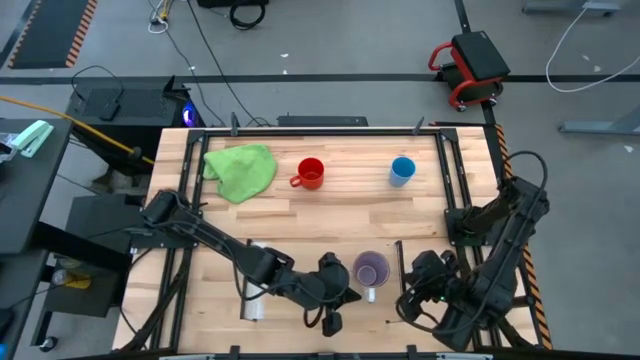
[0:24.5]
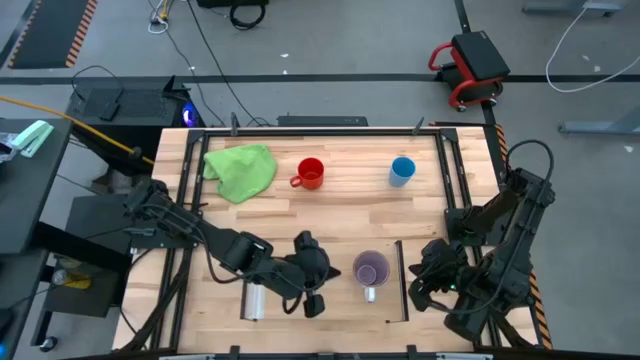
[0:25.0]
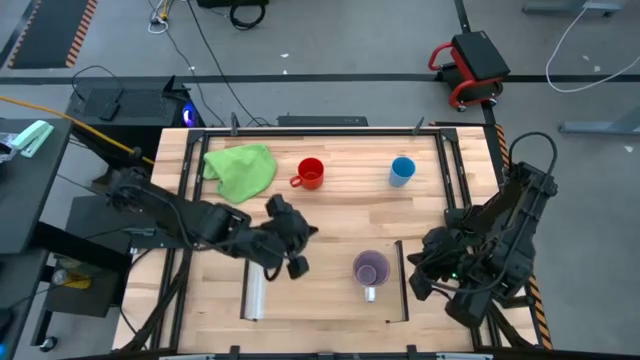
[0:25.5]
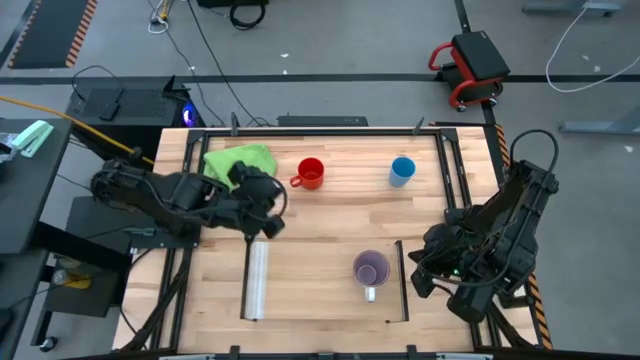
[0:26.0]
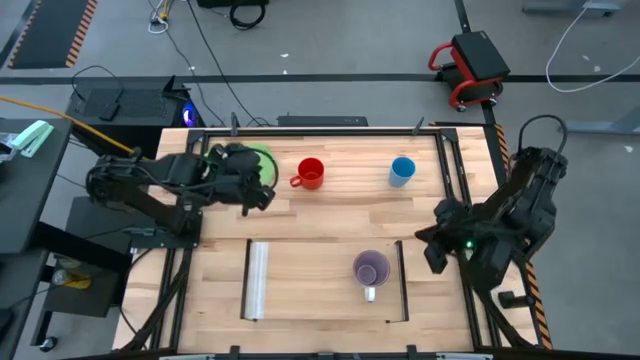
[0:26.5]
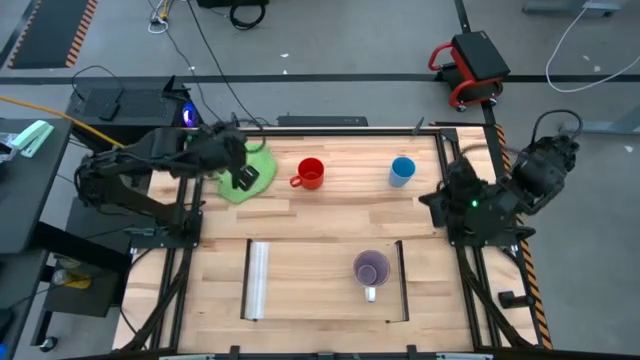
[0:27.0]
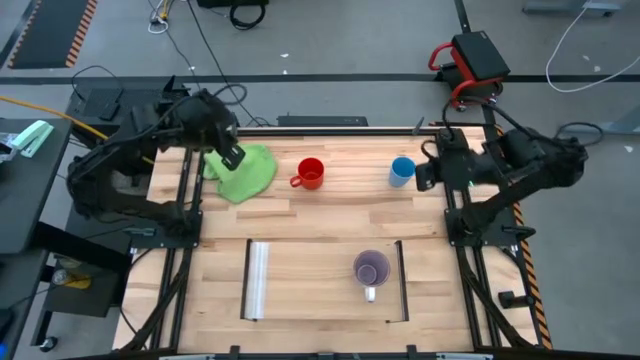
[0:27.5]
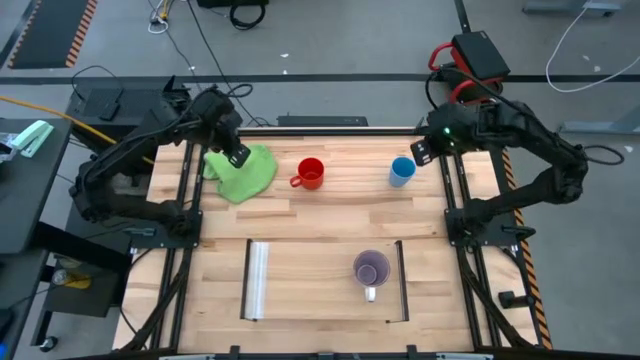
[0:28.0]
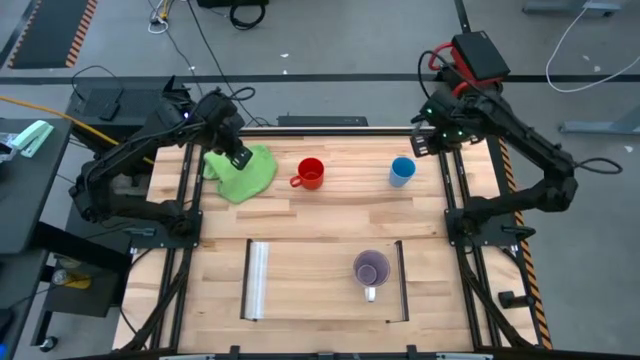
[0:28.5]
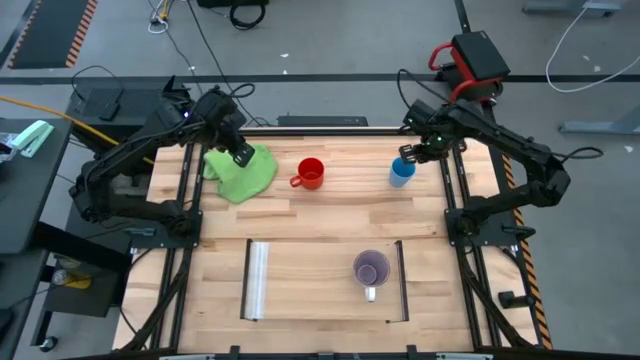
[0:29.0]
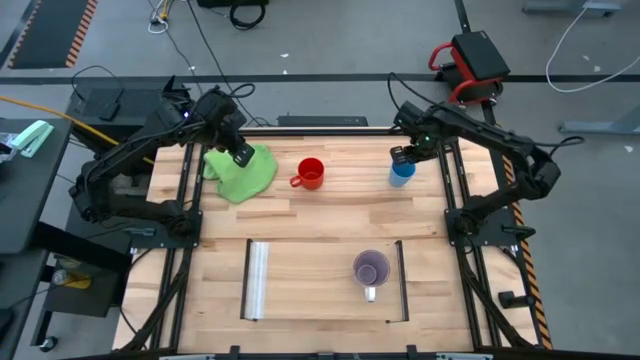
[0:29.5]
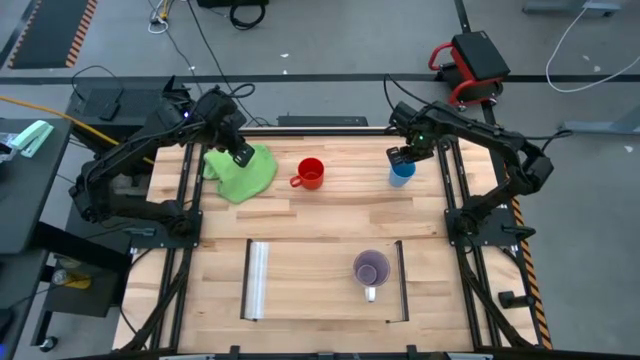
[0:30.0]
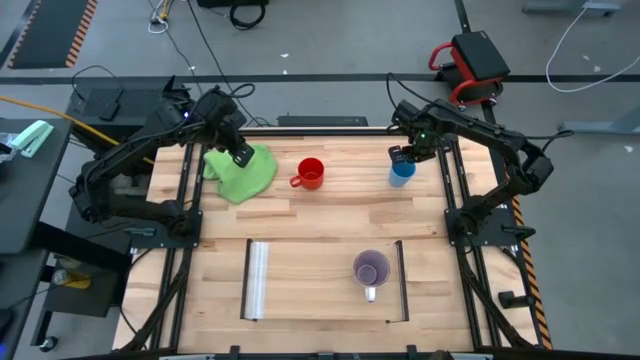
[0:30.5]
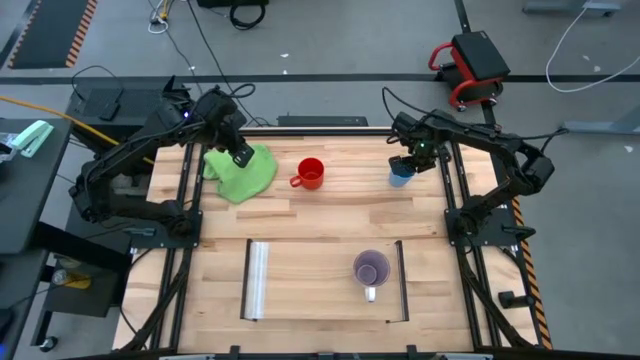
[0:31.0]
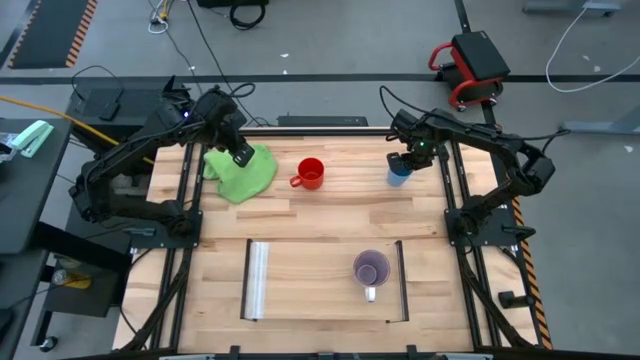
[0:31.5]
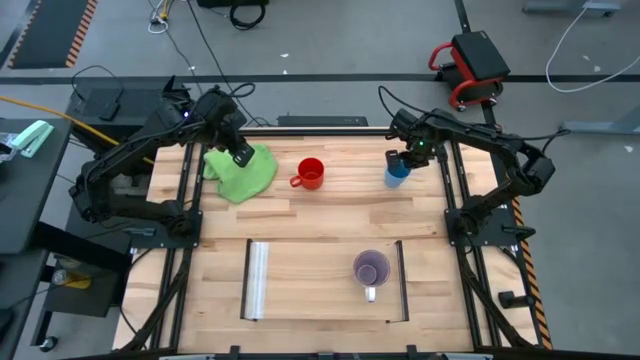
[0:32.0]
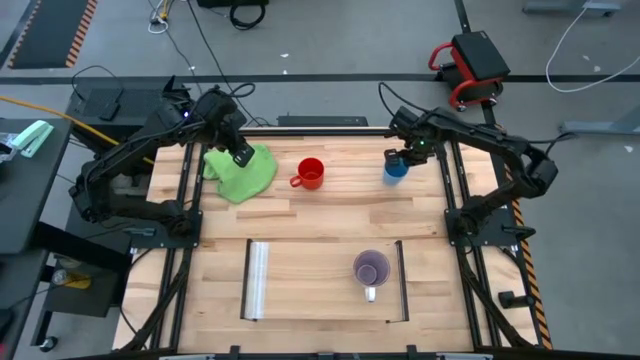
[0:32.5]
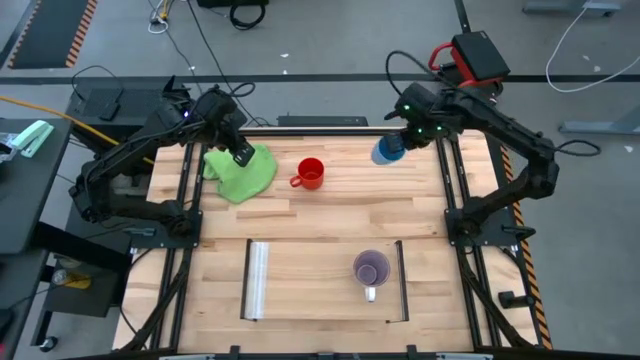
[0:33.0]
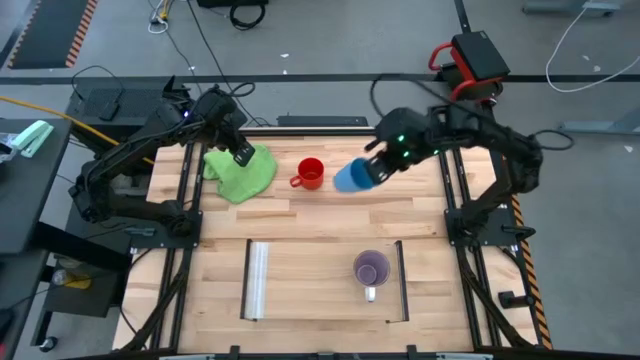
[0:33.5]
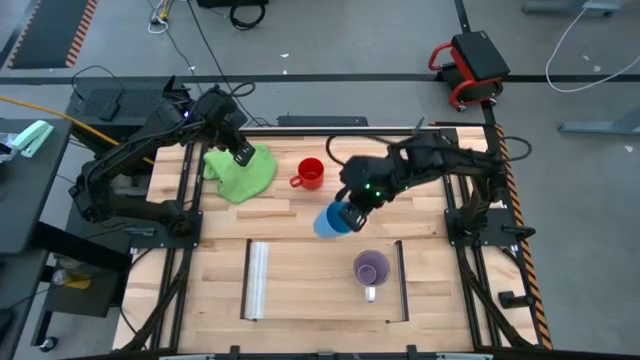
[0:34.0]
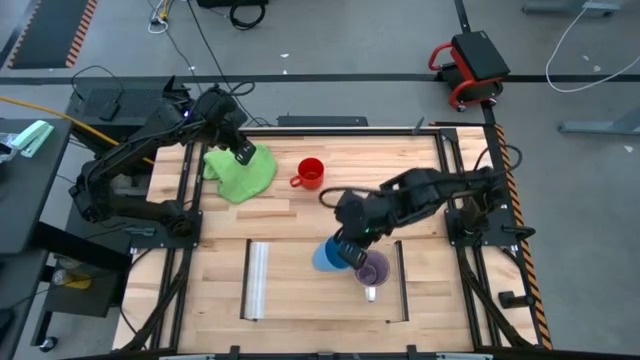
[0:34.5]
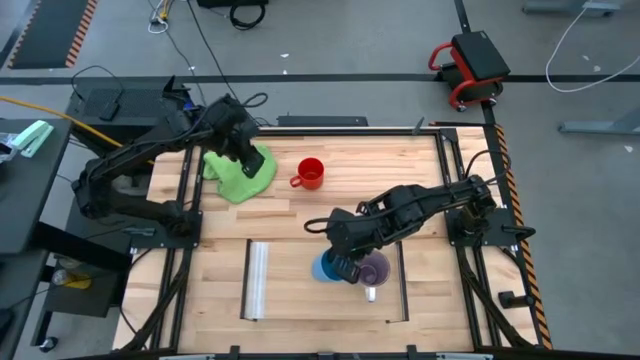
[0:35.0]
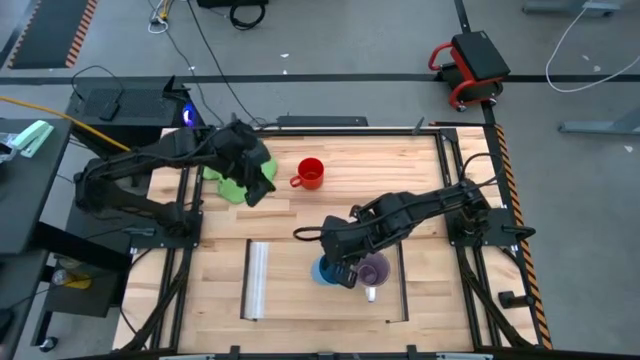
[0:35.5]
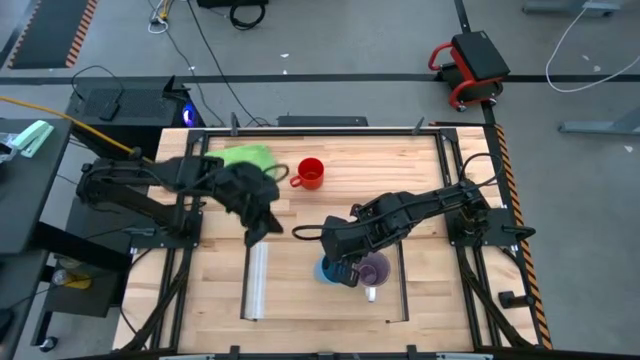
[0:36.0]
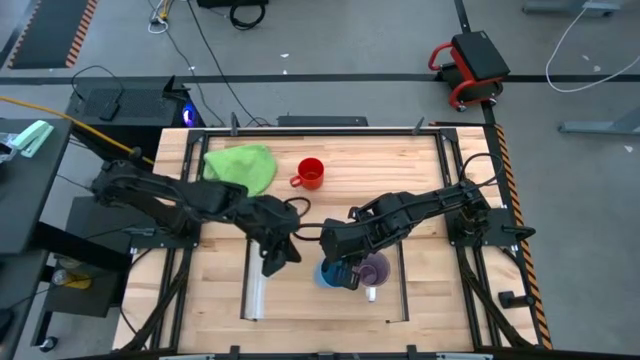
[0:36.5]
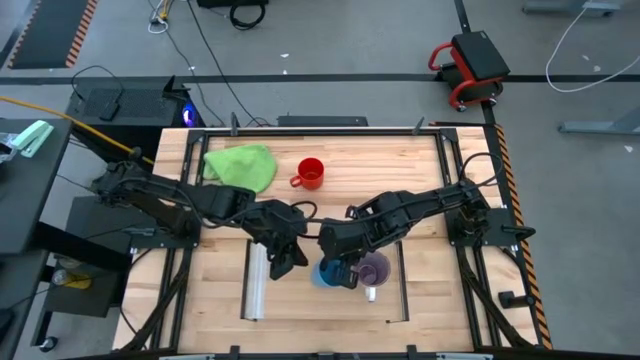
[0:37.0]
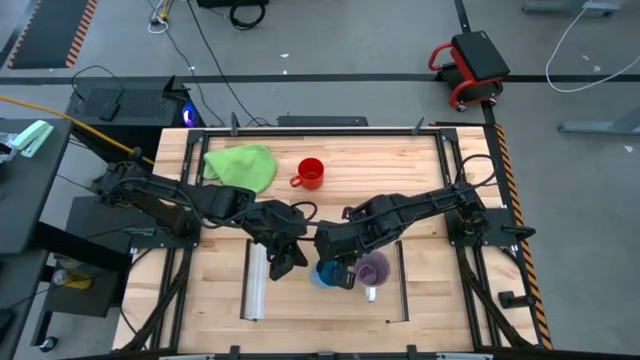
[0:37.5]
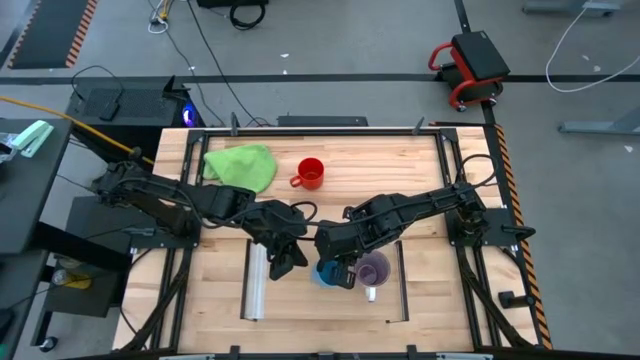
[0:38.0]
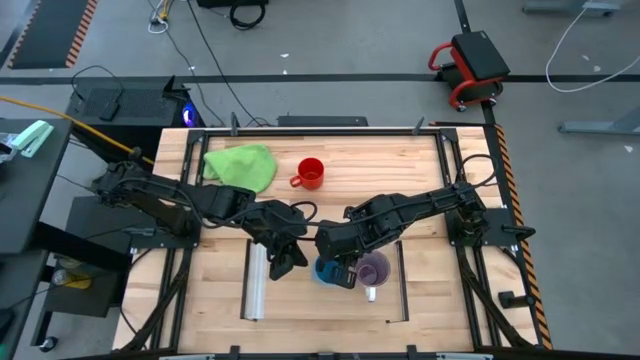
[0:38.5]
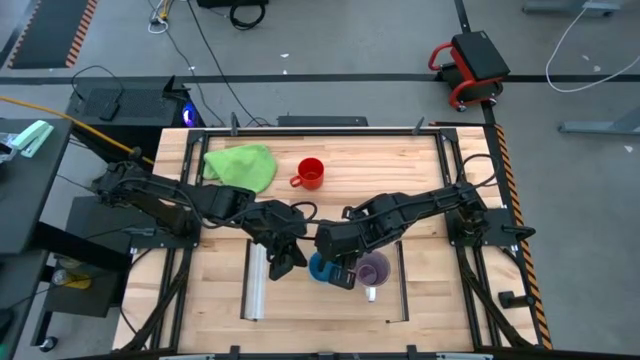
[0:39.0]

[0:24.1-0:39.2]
Task: Stack small to large cups/mugs on shelf
Put the blue cup on the shelf

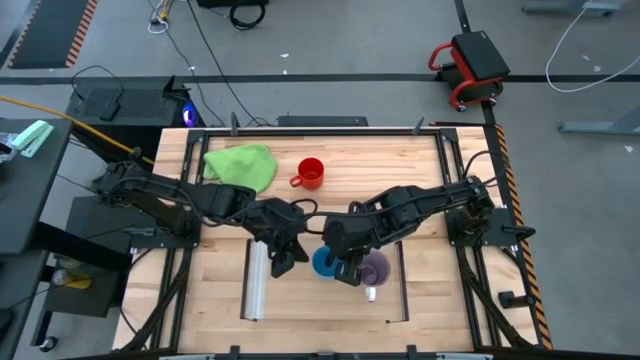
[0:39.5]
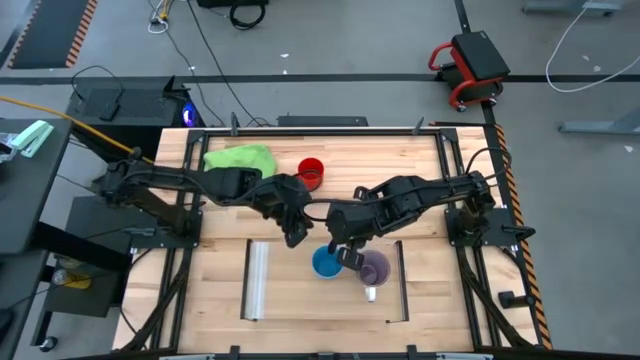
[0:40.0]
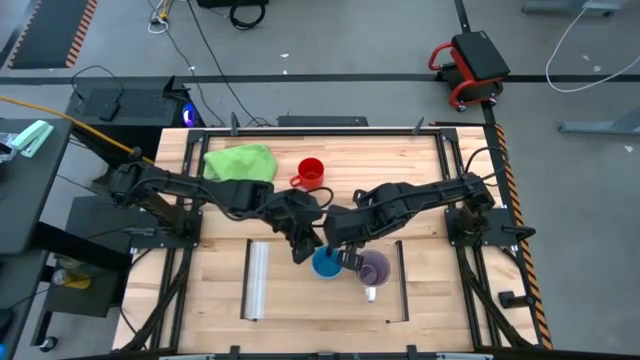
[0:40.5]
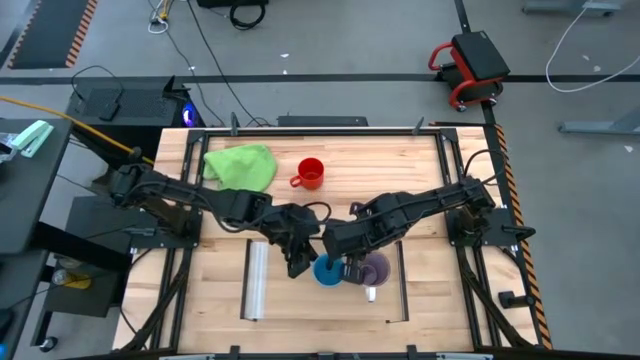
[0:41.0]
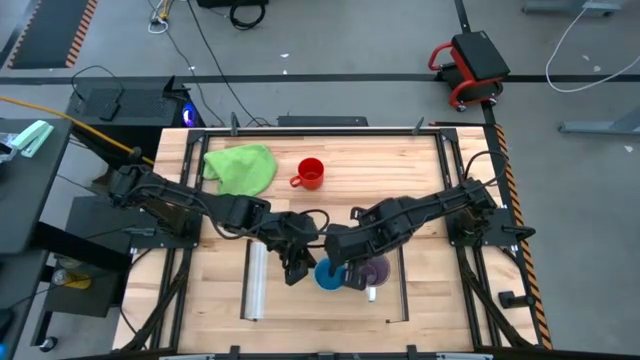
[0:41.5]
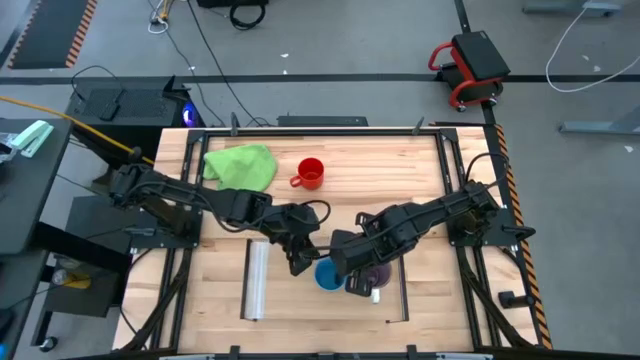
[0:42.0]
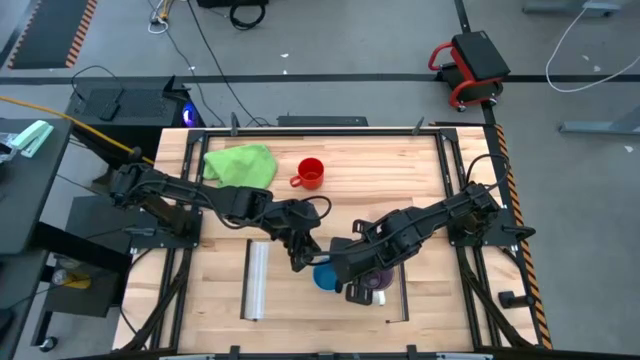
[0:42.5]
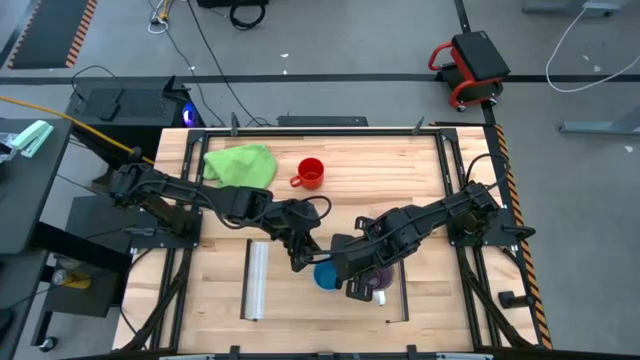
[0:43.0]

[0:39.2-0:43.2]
Adjust the blue cup on the shelf

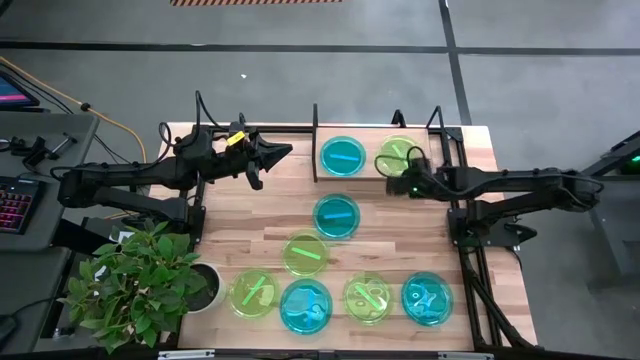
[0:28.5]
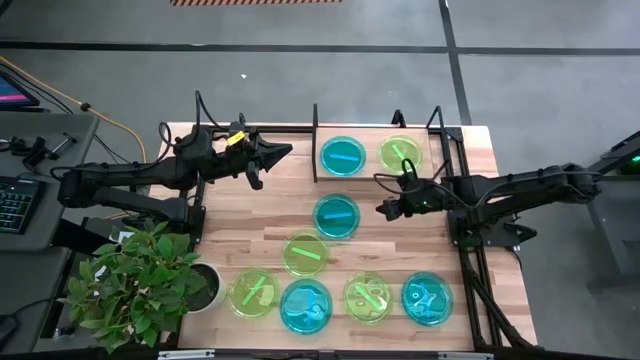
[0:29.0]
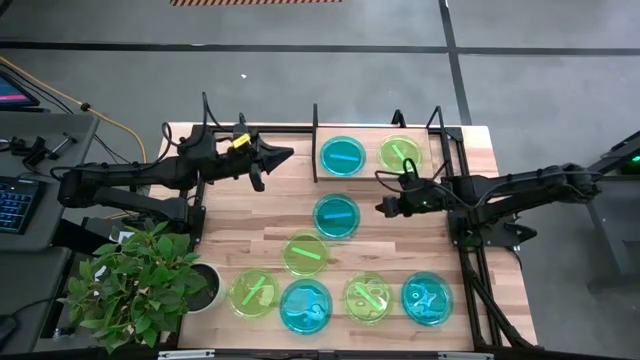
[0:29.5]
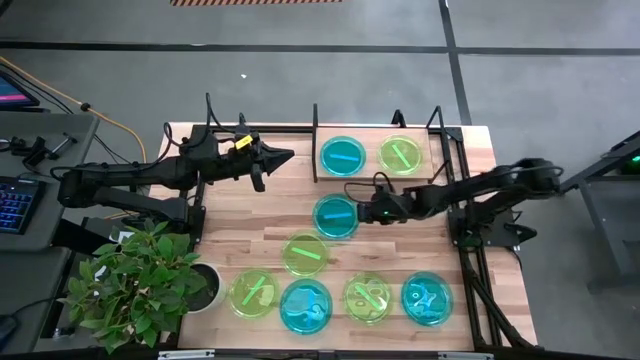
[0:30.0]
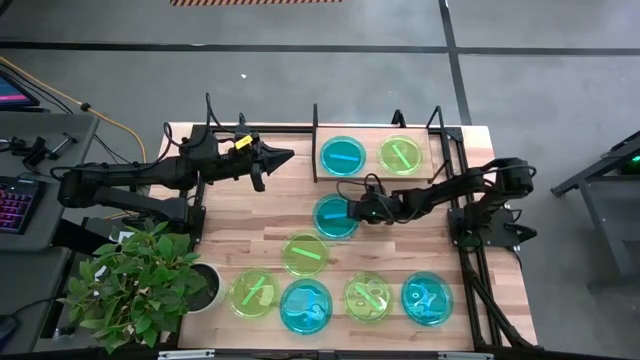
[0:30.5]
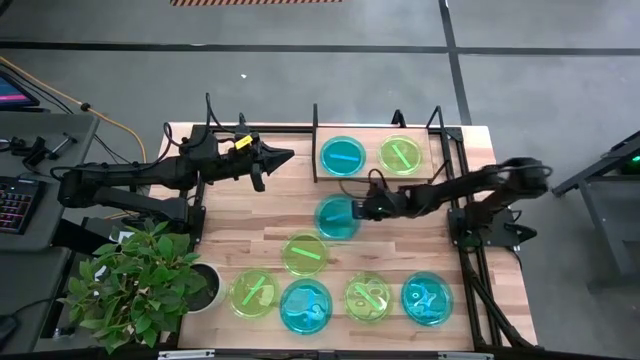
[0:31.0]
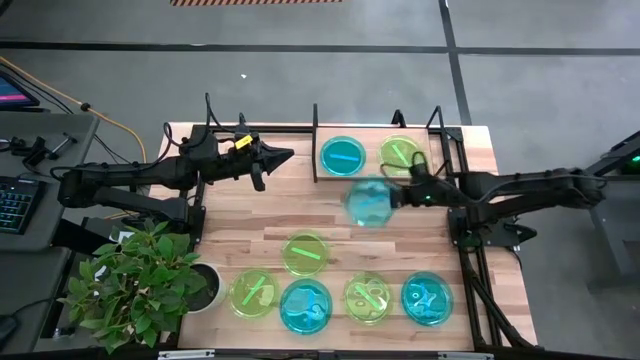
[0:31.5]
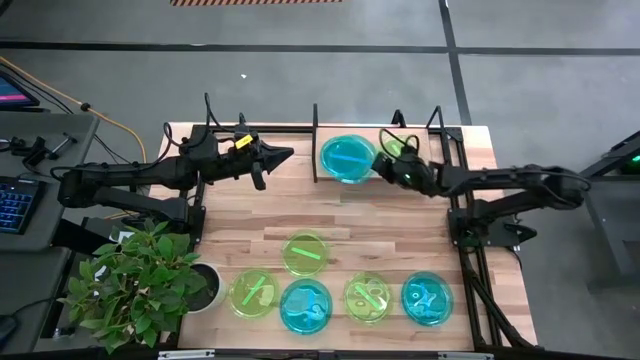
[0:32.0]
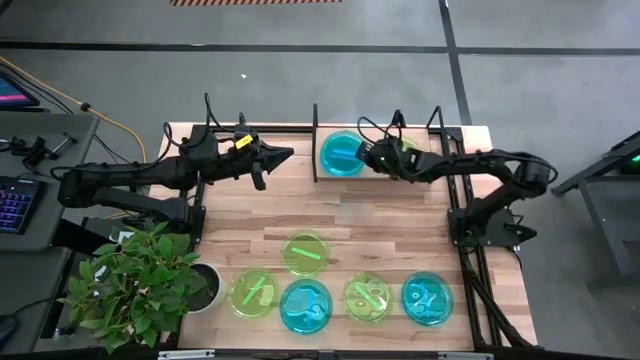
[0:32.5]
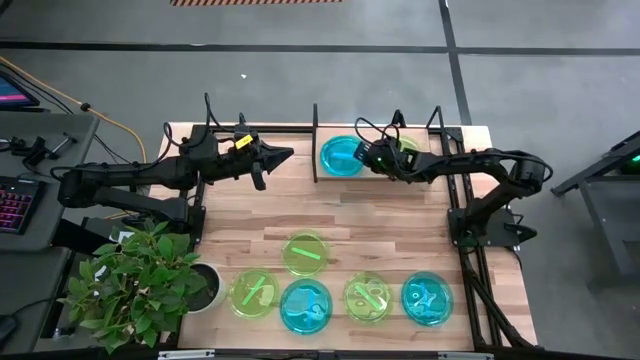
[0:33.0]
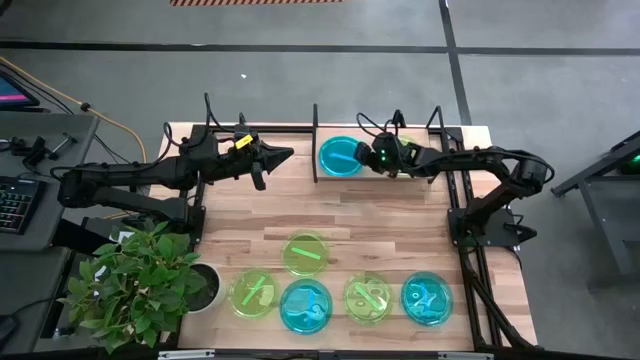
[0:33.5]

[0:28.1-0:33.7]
Task: Place and stack plates onto a shelf
Stack the top blue plate on top of the blue plate on the shelf
